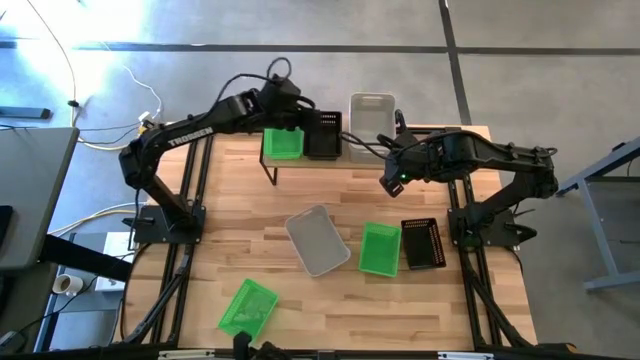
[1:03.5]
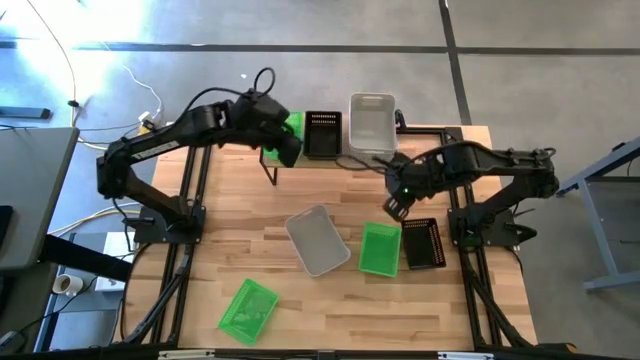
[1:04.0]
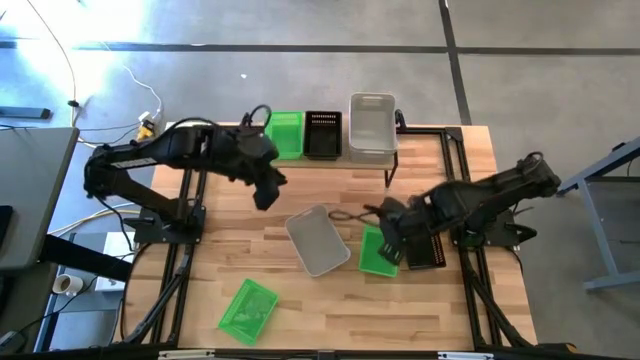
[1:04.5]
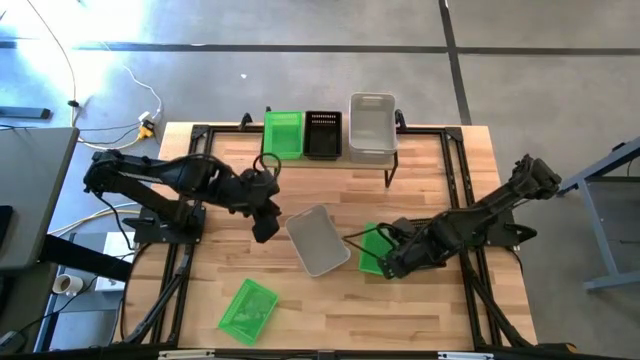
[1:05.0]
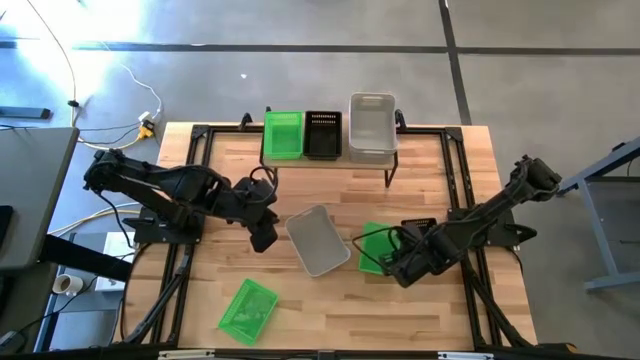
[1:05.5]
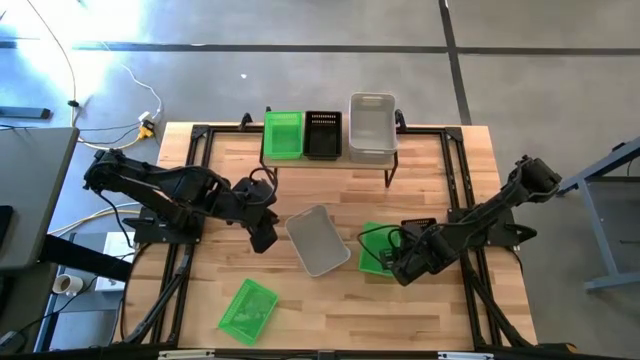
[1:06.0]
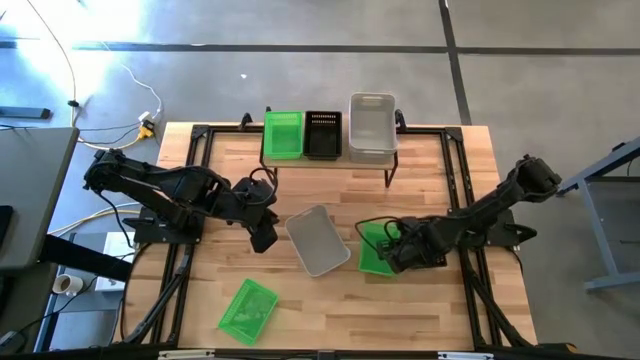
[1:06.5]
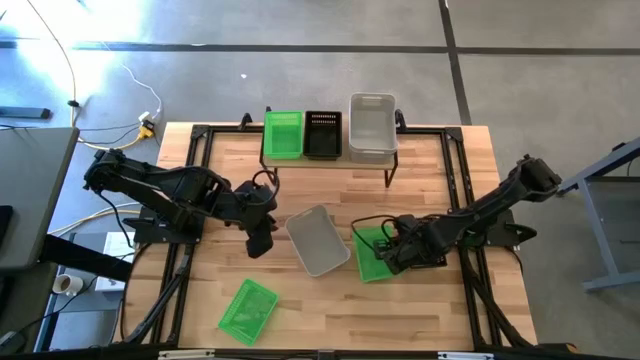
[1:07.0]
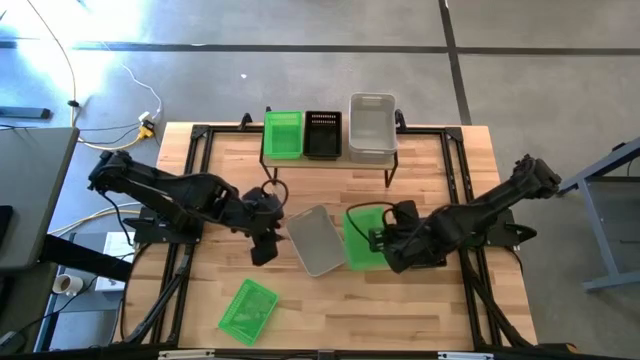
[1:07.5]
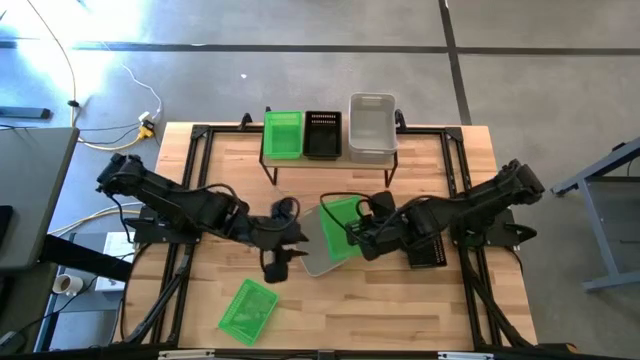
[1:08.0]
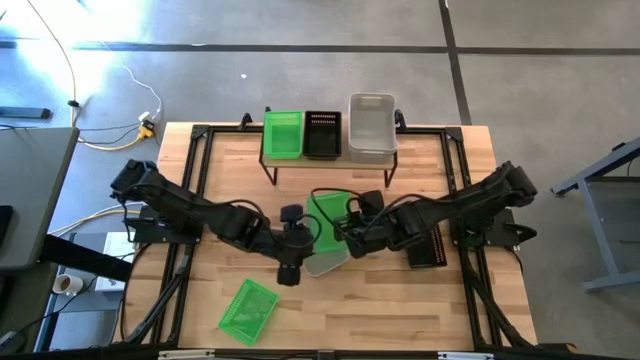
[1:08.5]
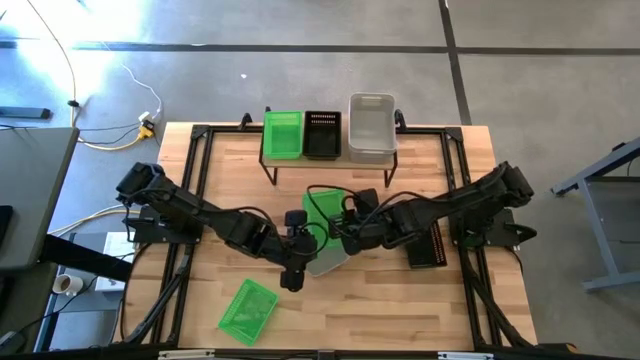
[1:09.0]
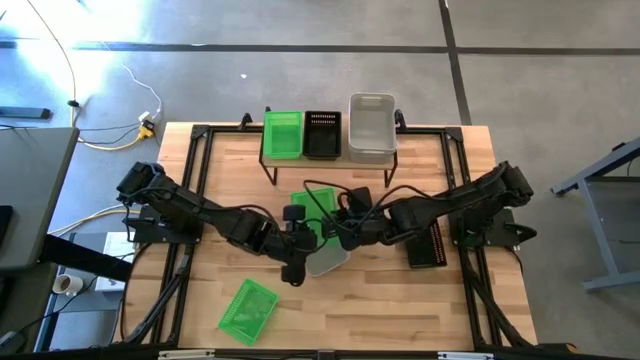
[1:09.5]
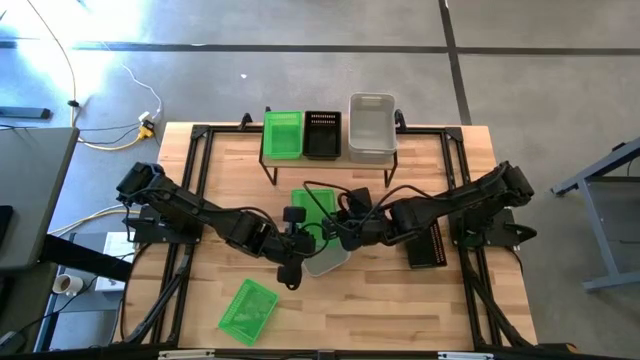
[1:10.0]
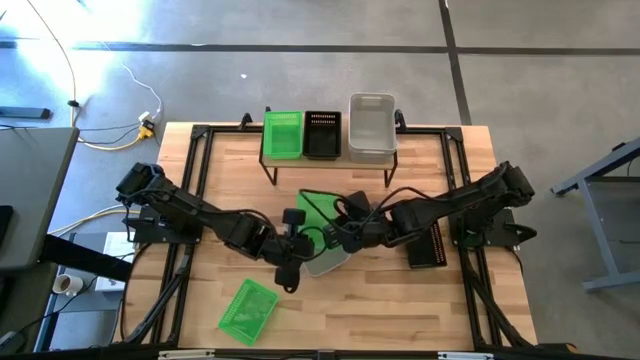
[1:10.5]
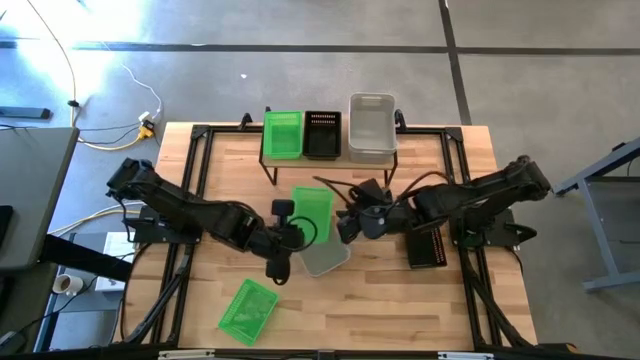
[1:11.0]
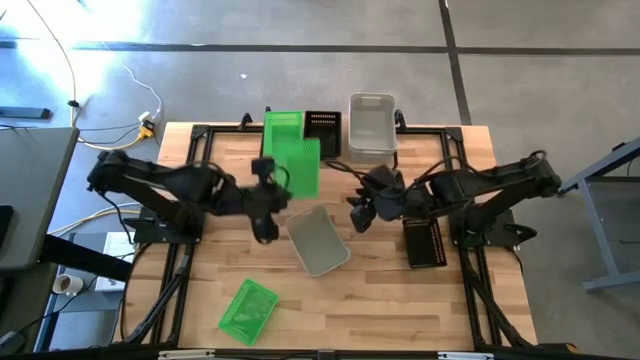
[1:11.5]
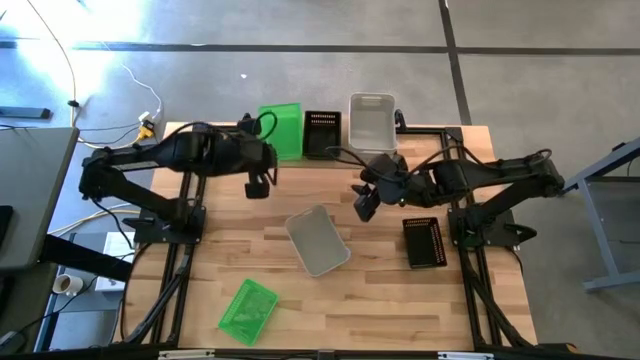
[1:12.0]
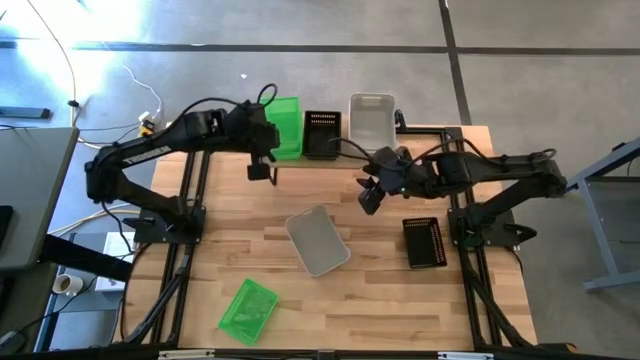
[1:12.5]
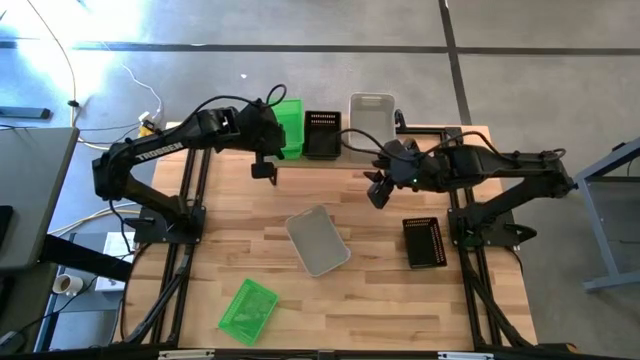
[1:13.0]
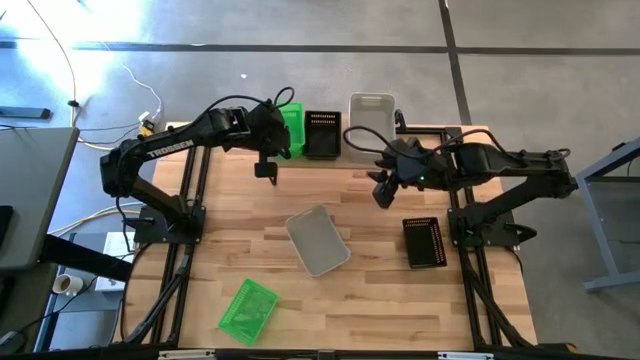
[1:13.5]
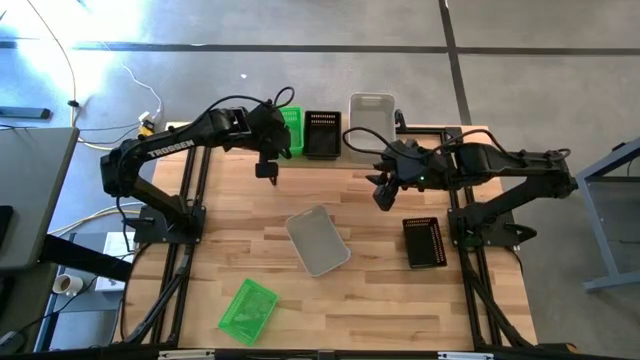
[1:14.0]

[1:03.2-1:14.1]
Task: Stack baskets on shelf by color
Stack the top green bin on top of the green bin on the shelf

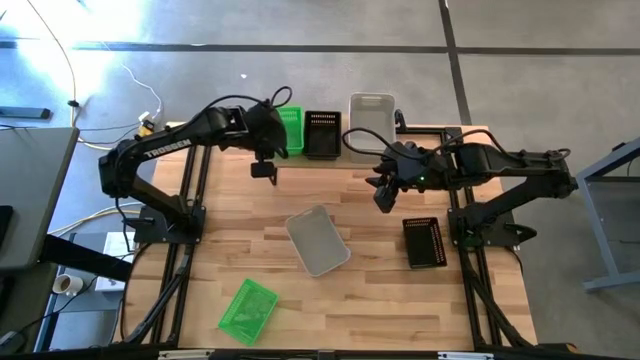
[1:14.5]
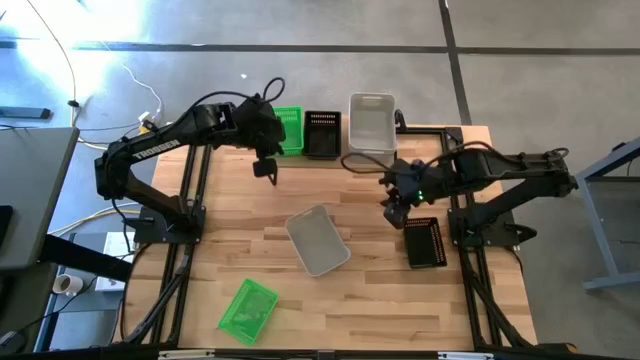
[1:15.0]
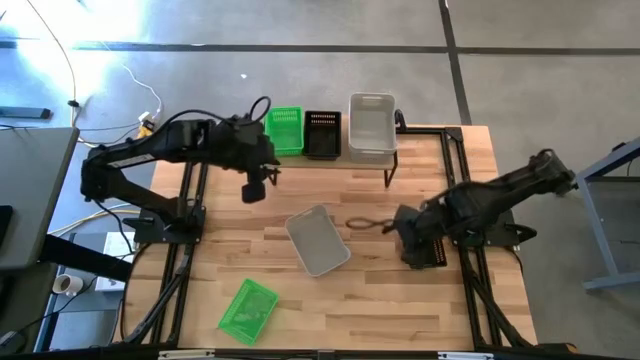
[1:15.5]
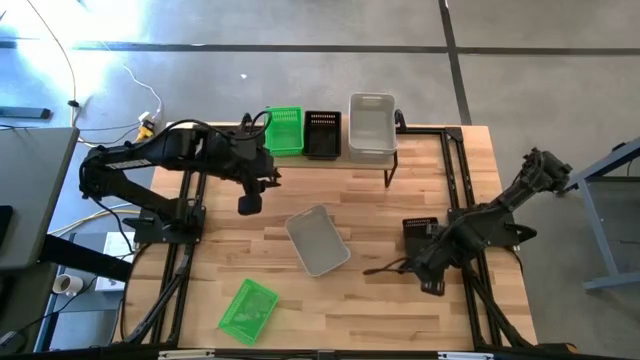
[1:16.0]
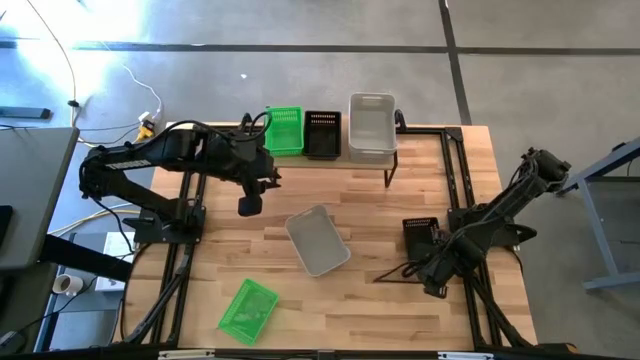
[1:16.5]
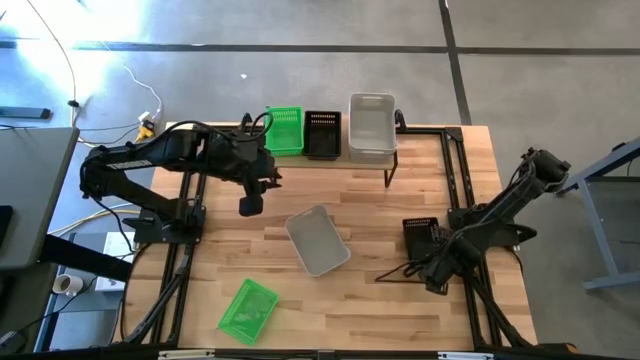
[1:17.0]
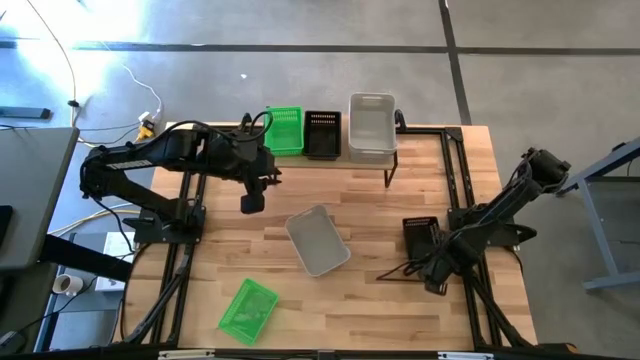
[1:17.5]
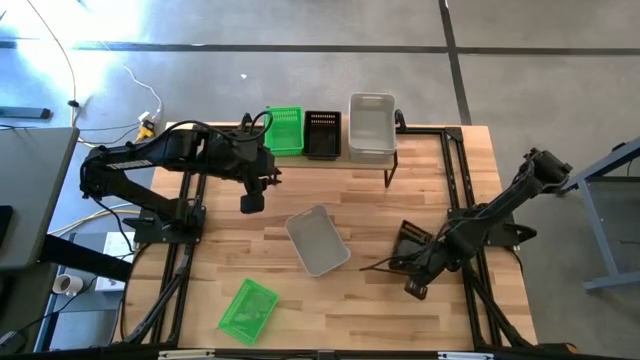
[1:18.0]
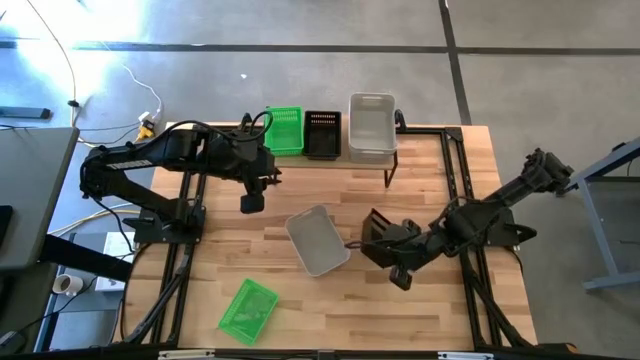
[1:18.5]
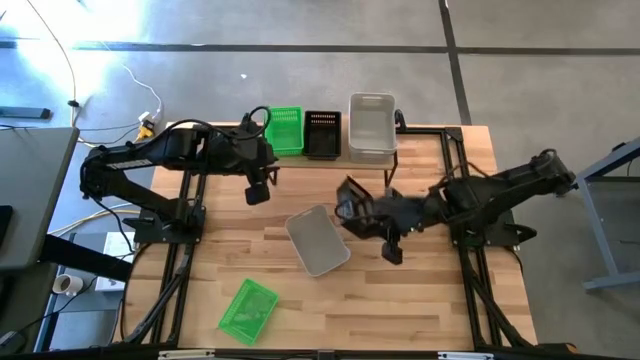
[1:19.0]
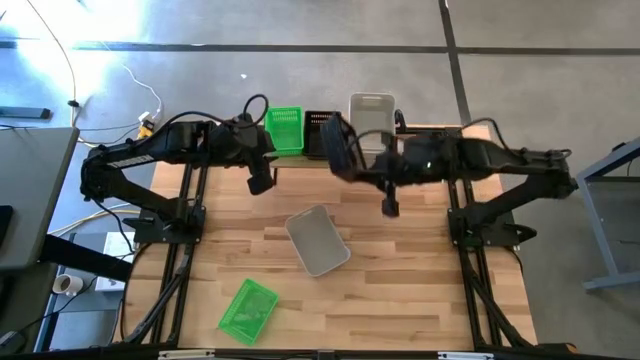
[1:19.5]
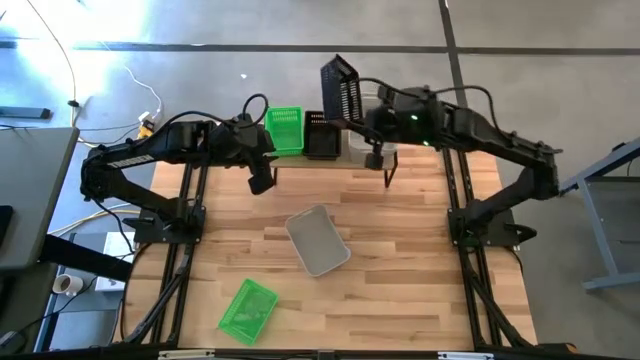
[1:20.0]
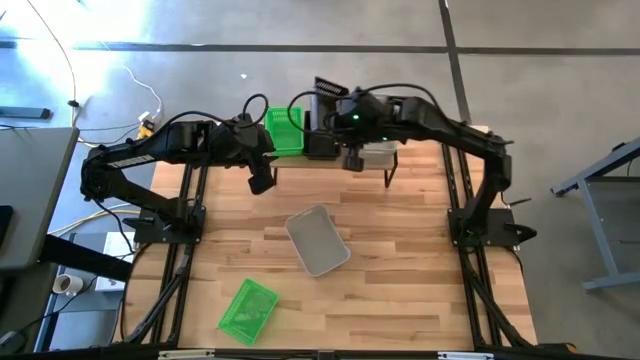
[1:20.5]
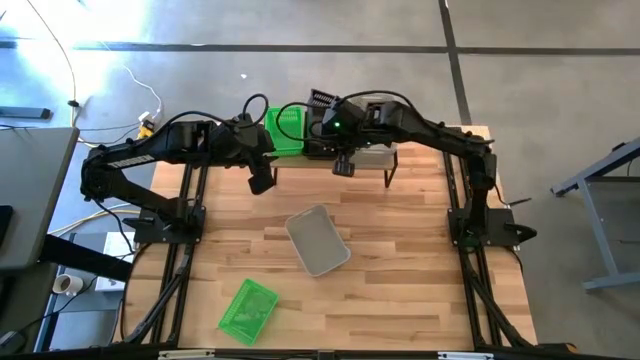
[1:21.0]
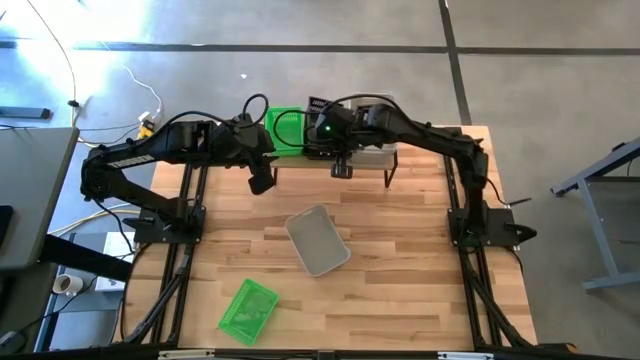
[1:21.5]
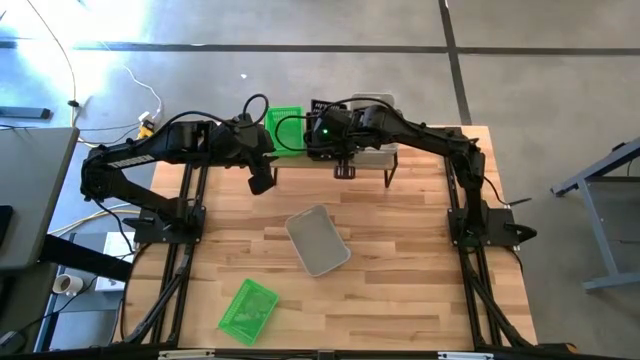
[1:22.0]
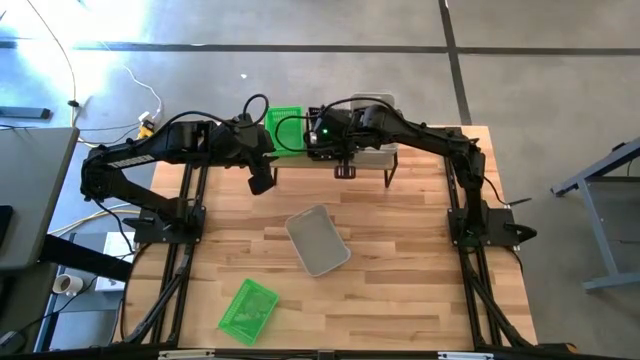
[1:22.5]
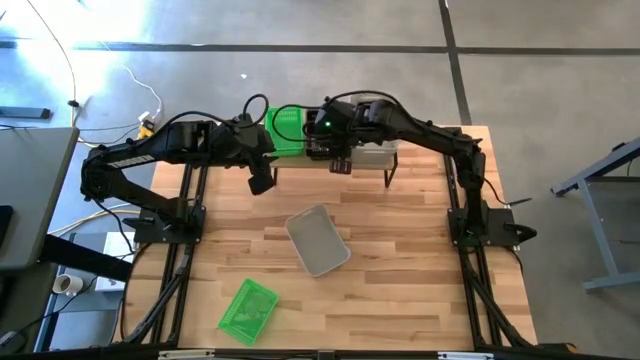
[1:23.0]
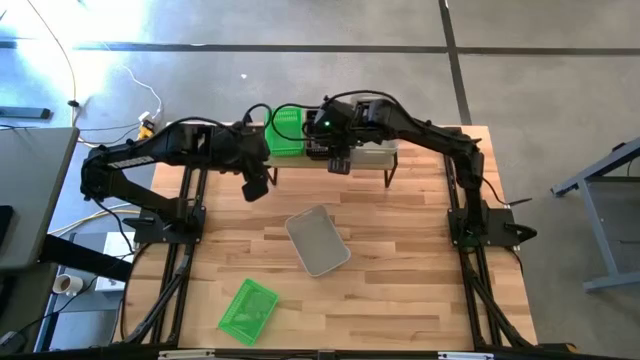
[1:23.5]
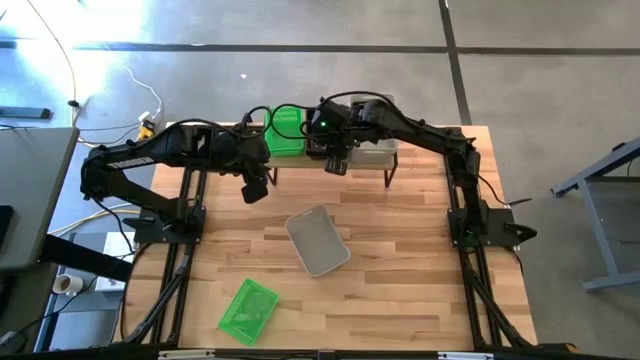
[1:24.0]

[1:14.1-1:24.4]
Stack the black bin on top of the black bins on the shelf
